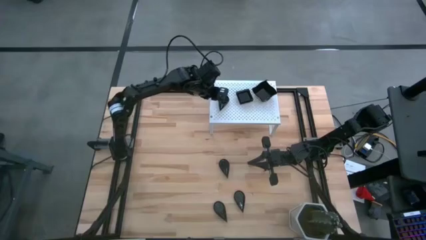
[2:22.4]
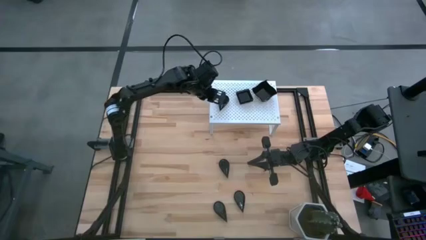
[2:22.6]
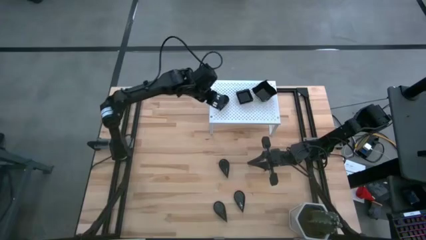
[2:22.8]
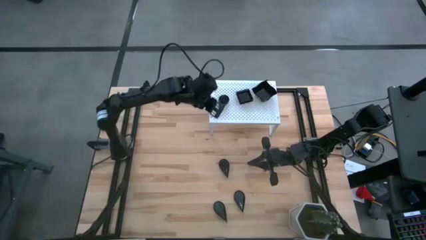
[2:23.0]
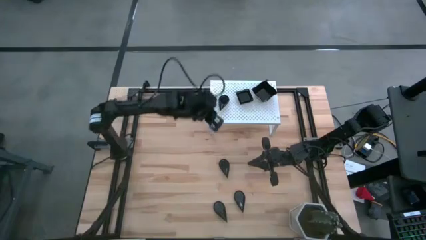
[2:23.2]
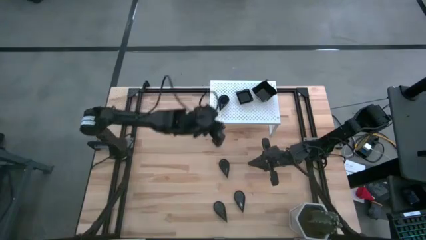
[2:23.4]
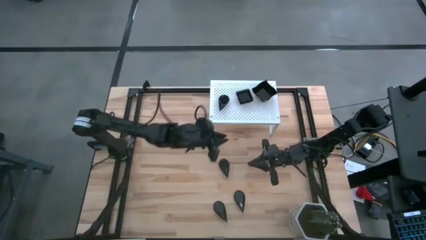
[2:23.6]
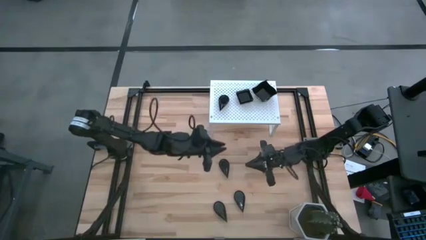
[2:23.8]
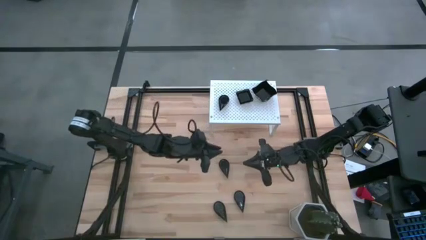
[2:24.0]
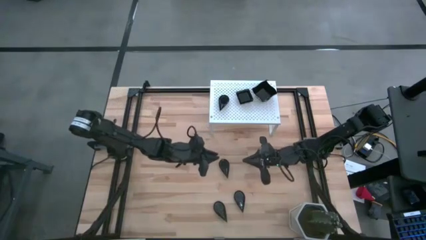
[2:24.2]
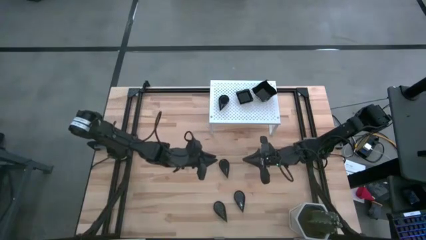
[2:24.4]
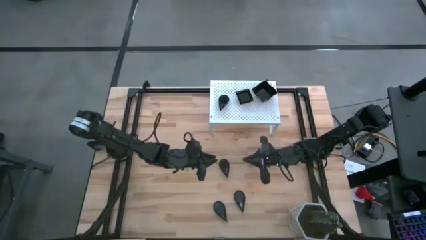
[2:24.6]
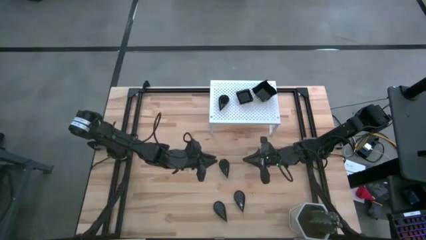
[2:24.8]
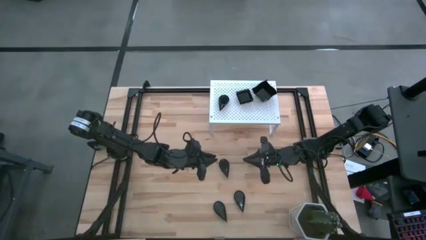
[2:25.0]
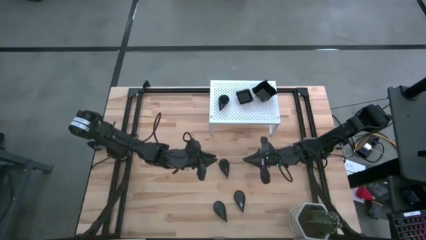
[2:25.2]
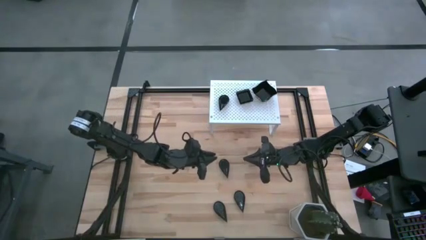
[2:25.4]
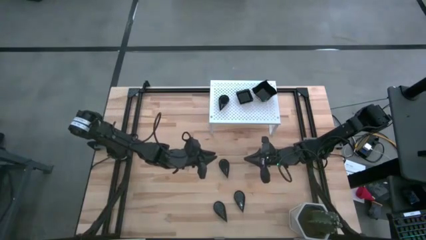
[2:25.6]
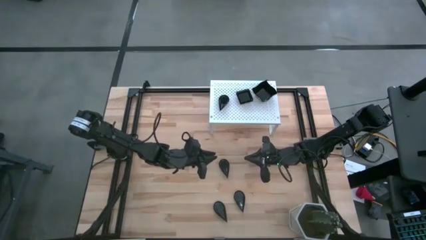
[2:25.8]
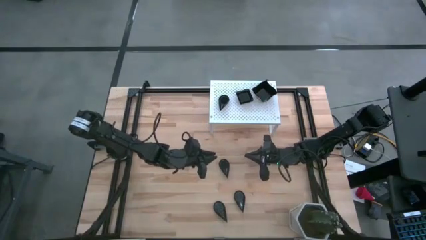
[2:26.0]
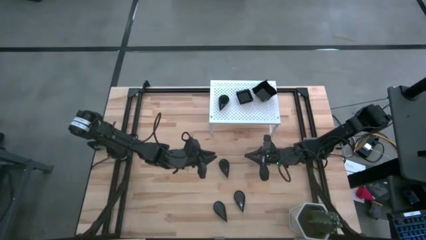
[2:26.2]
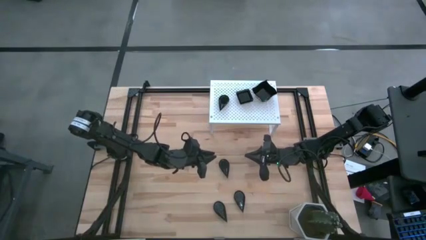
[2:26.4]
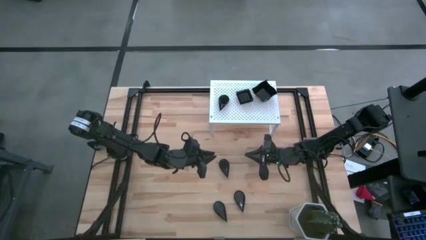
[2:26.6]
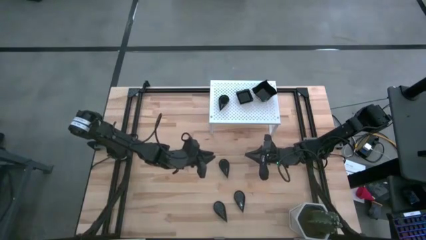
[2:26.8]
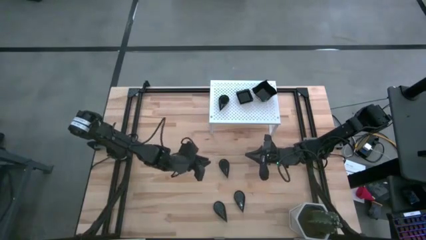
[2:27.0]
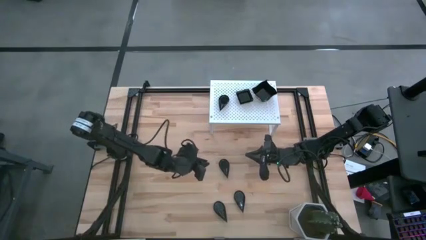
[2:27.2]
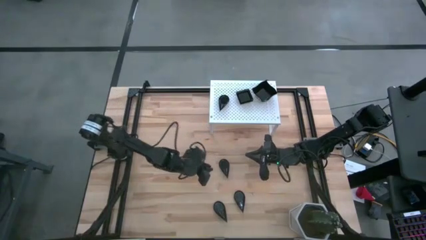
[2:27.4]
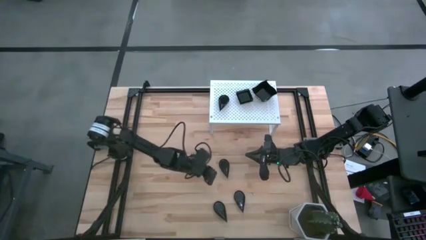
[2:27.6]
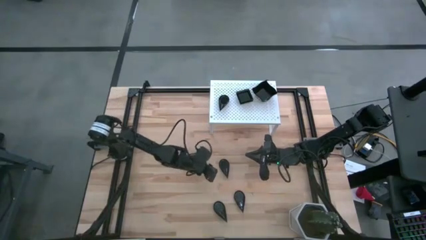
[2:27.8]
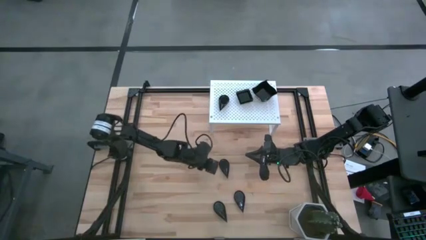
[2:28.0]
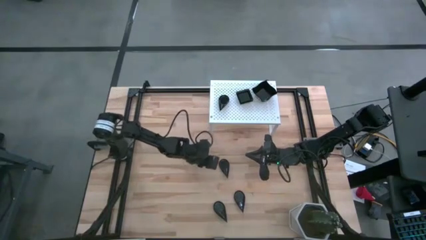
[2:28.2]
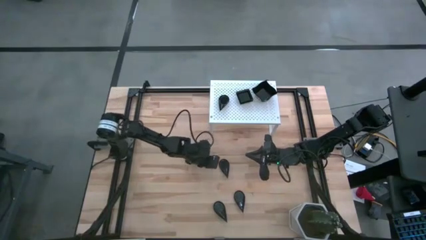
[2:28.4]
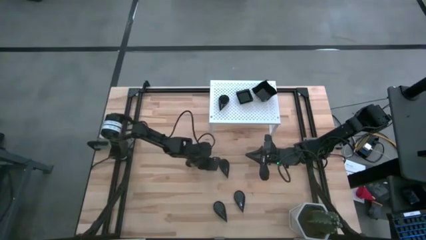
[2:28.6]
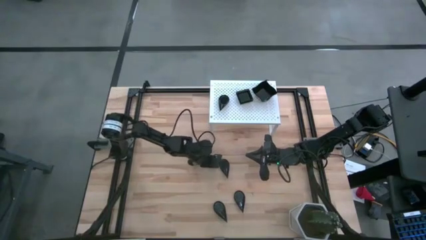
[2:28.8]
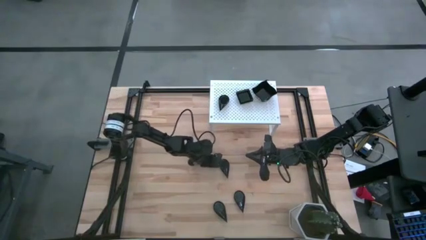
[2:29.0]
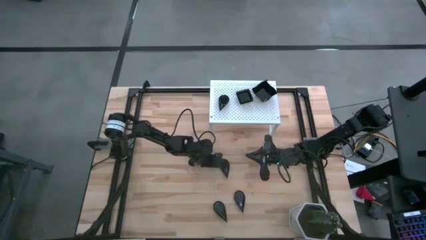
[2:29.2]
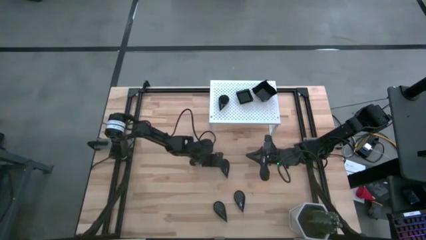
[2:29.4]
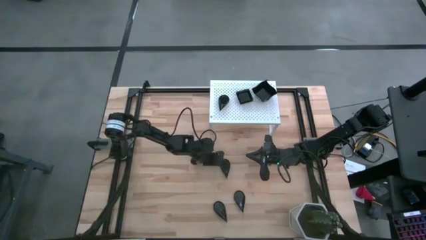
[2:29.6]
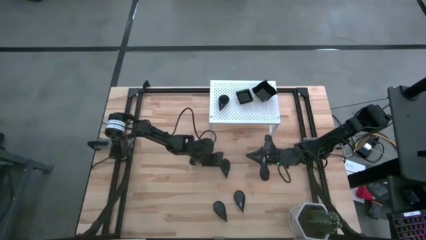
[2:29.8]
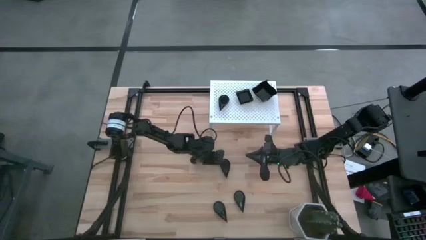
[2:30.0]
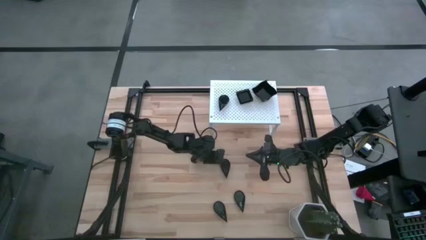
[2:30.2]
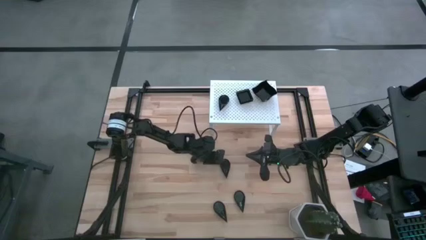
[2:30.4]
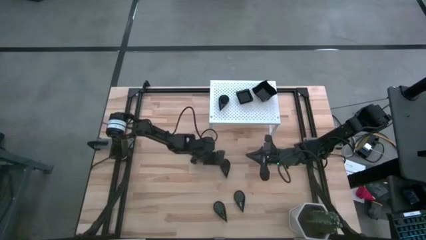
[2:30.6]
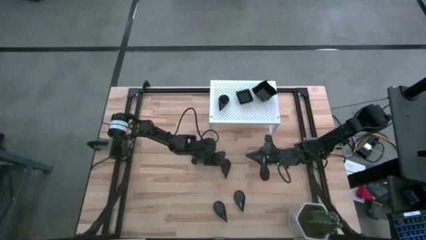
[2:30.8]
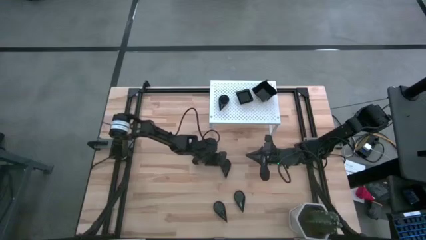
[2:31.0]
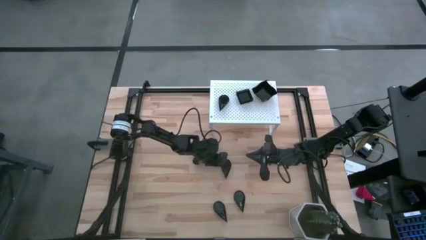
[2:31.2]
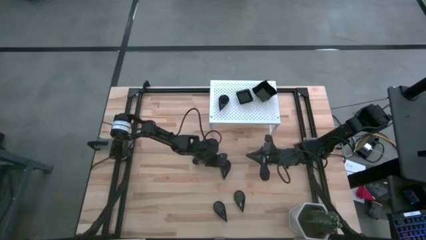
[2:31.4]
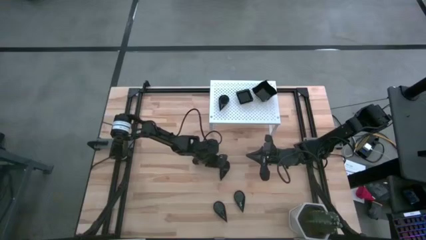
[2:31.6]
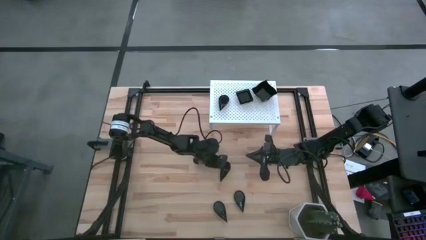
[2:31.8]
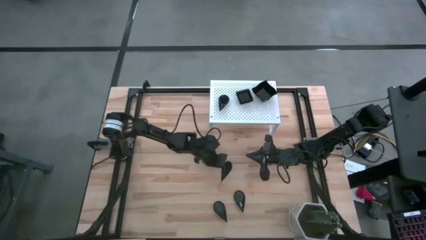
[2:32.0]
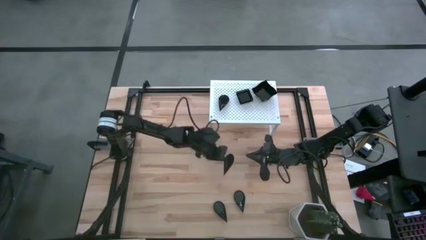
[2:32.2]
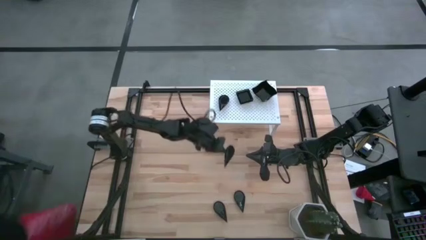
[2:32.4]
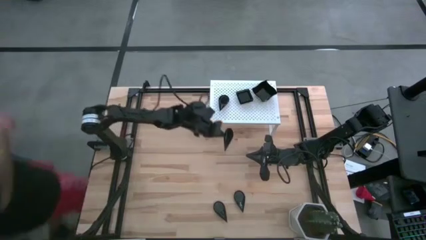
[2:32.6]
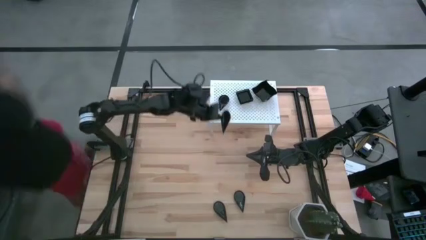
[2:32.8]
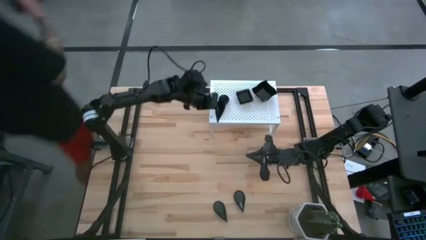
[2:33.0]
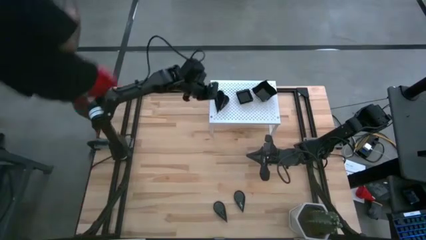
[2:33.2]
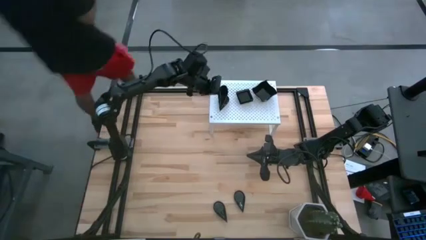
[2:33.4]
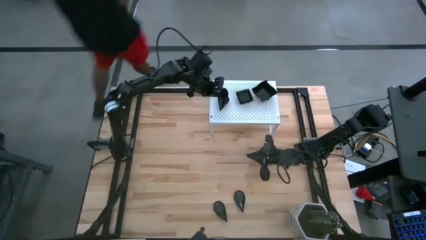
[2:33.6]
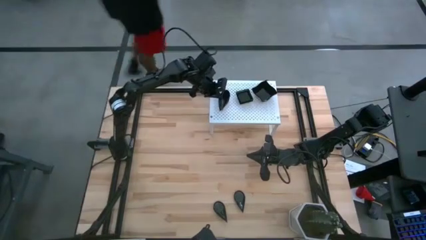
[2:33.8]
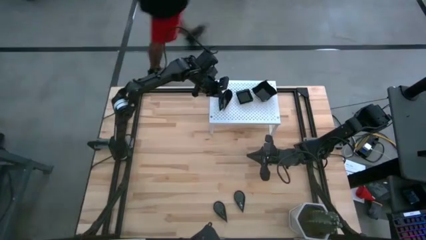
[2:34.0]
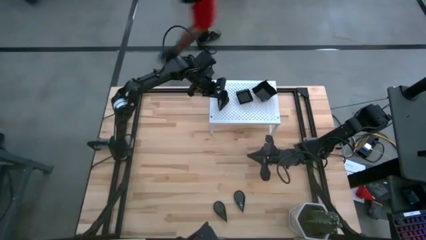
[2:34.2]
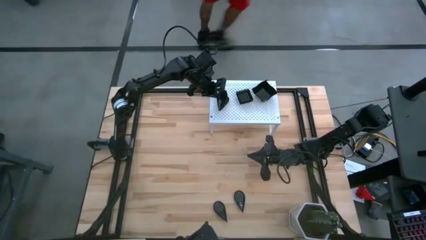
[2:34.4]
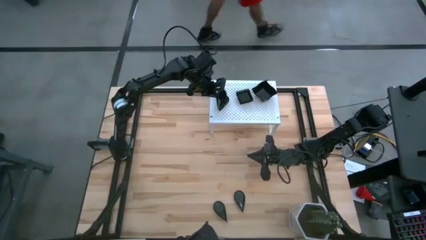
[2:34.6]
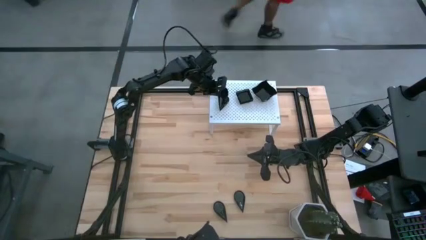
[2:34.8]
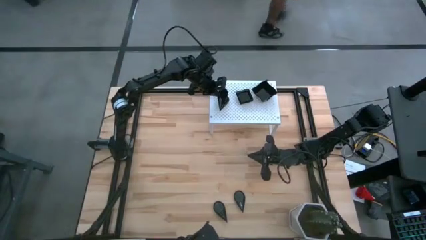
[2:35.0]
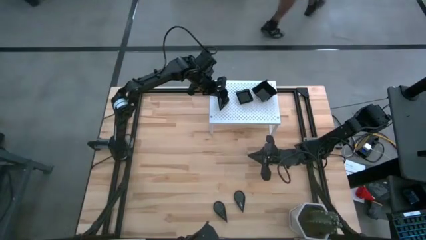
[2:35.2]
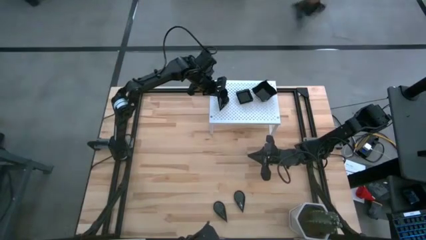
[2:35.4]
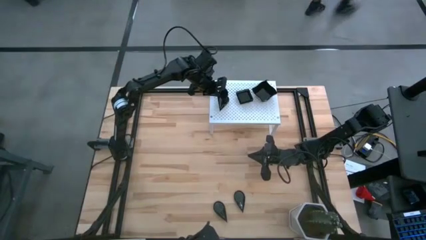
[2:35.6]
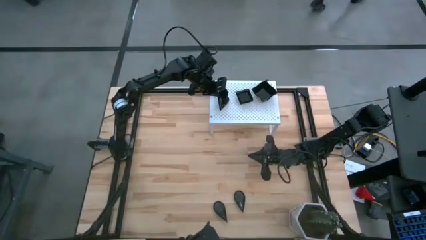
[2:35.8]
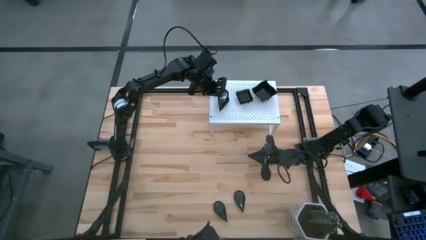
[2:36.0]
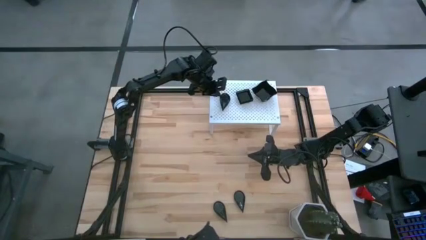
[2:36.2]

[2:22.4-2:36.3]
Task: Pick & Place Mini shaped plates
Stack the drop shaped plate on top of the drop shaped plate on the shelf
